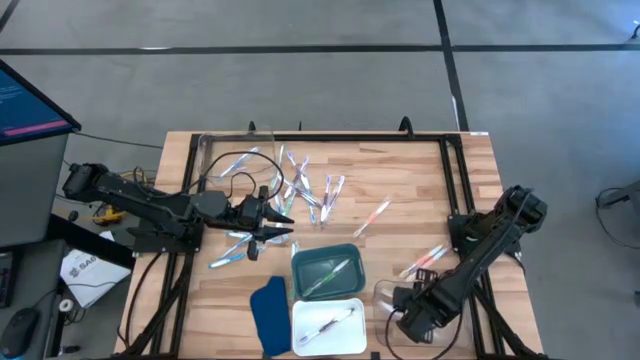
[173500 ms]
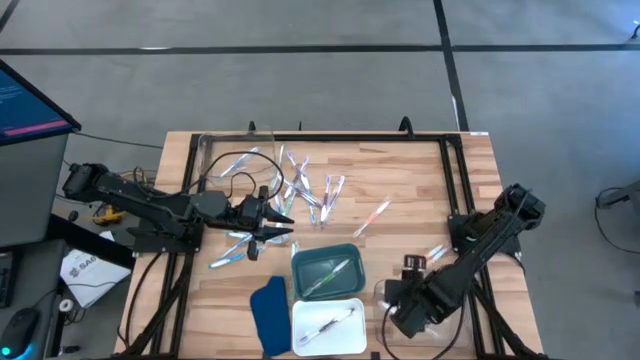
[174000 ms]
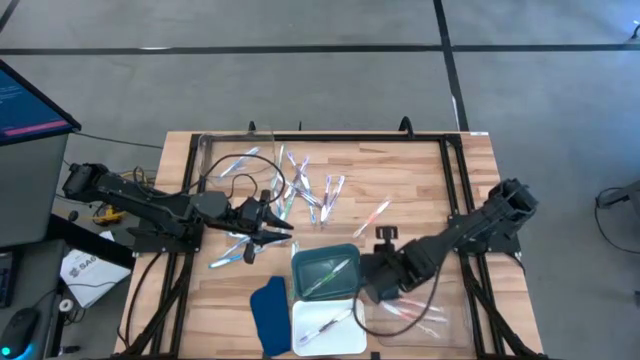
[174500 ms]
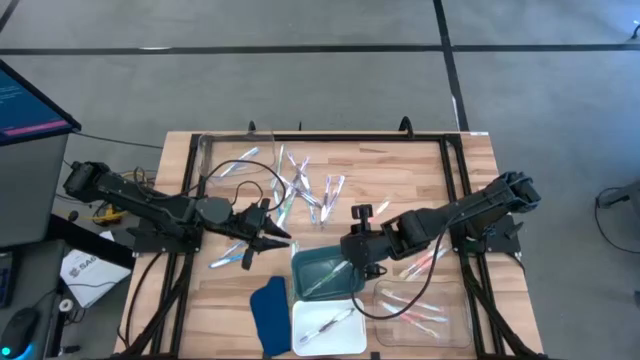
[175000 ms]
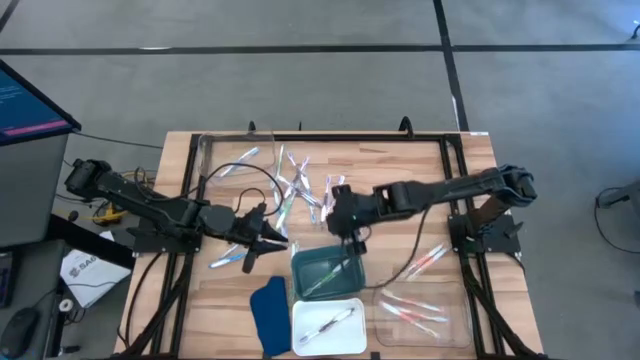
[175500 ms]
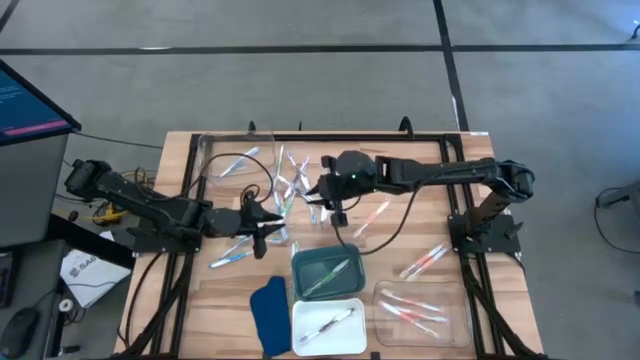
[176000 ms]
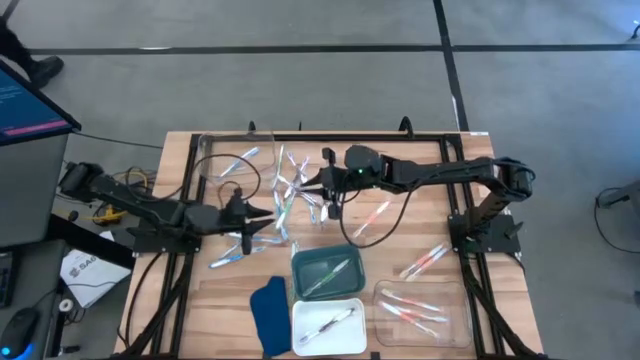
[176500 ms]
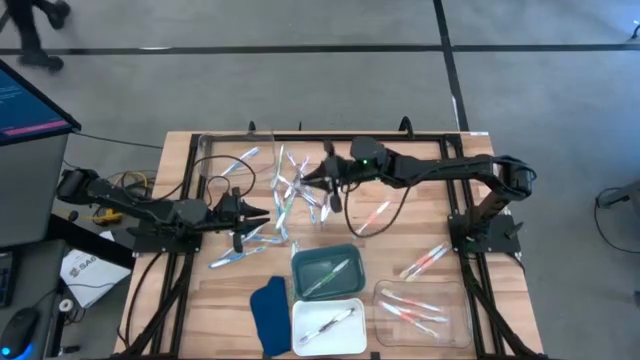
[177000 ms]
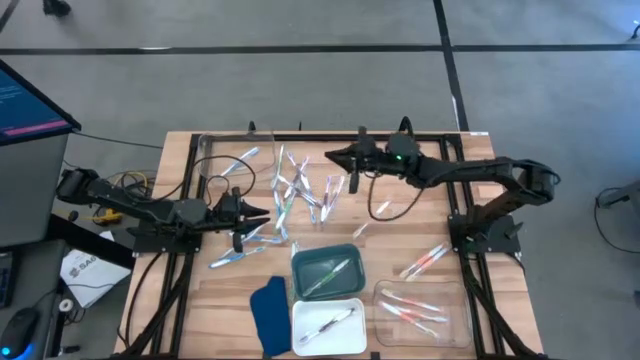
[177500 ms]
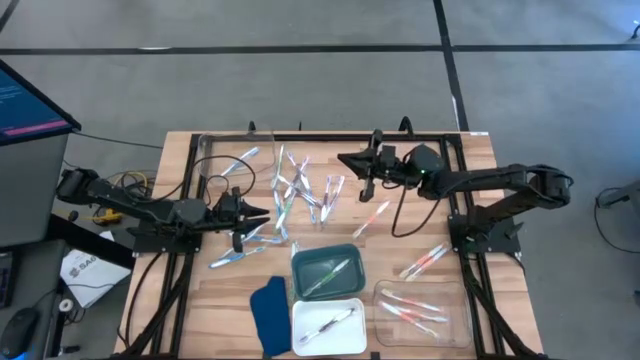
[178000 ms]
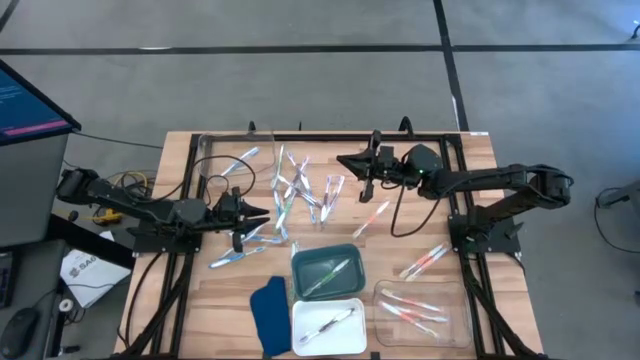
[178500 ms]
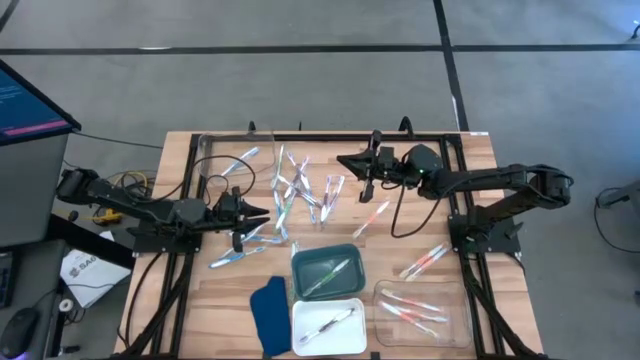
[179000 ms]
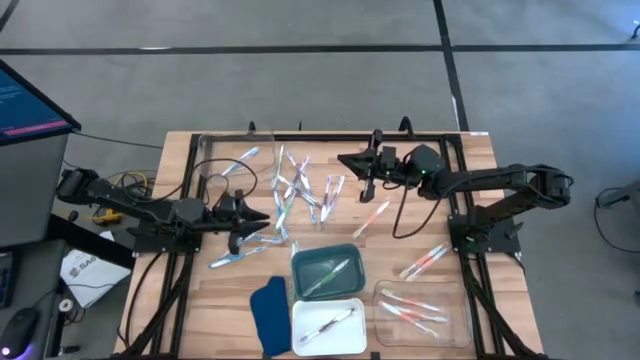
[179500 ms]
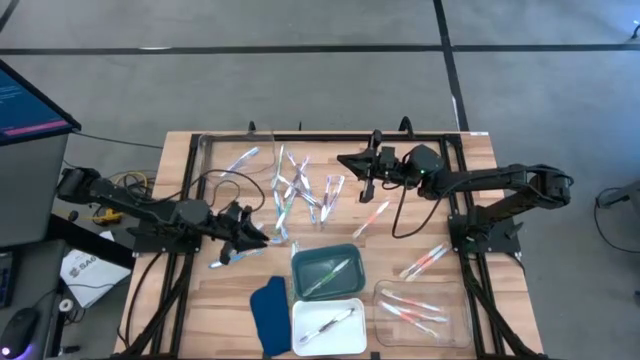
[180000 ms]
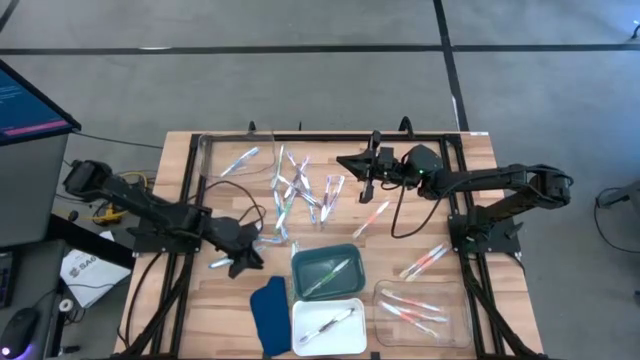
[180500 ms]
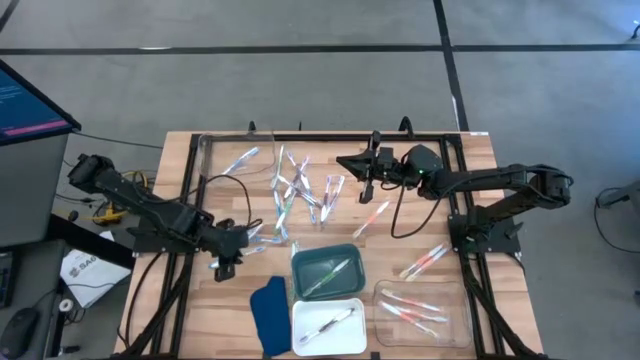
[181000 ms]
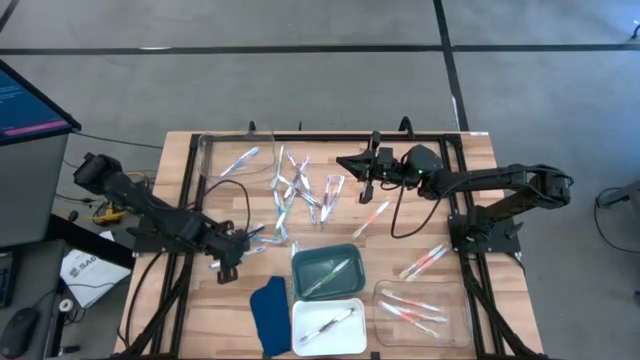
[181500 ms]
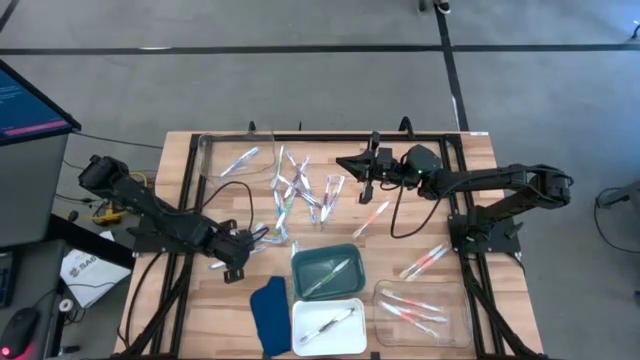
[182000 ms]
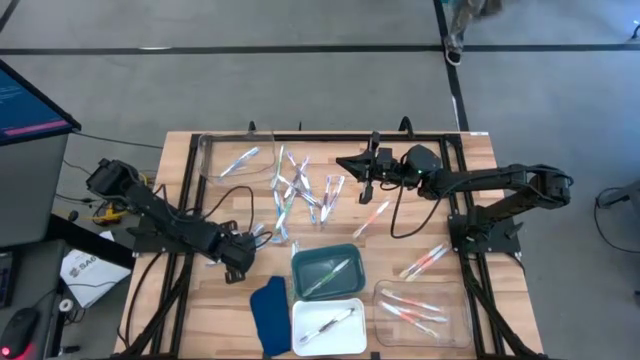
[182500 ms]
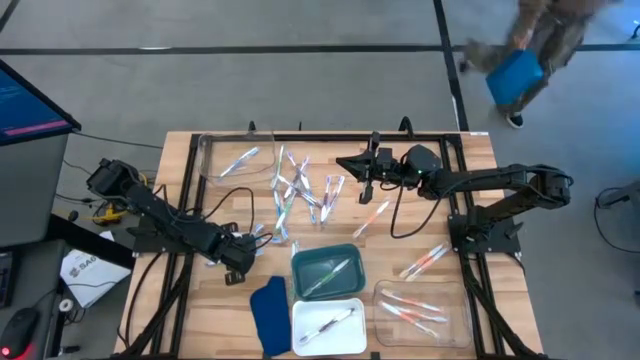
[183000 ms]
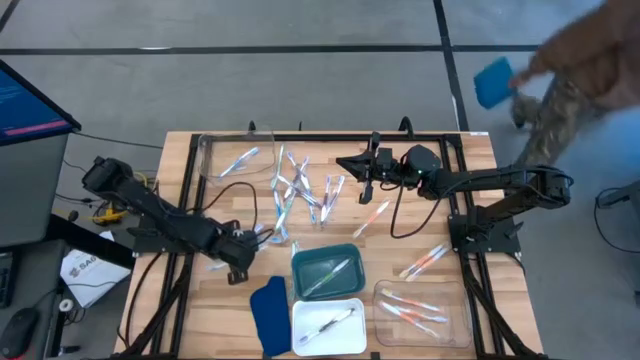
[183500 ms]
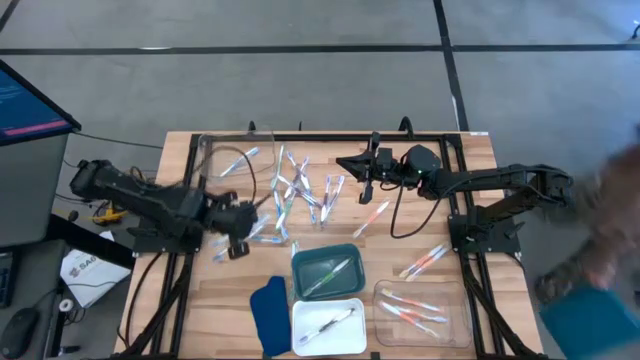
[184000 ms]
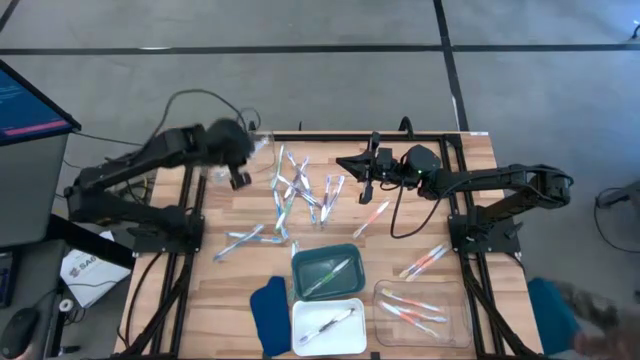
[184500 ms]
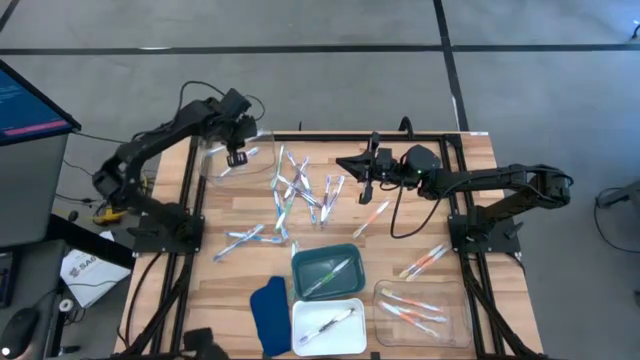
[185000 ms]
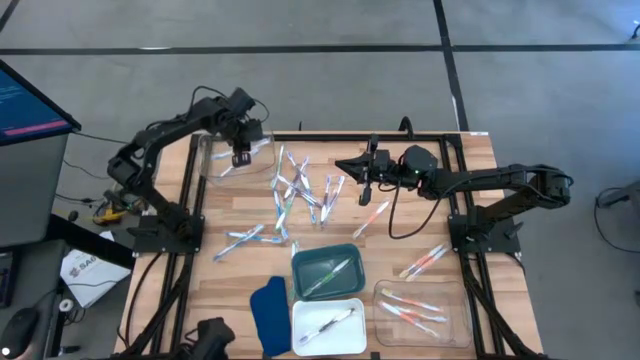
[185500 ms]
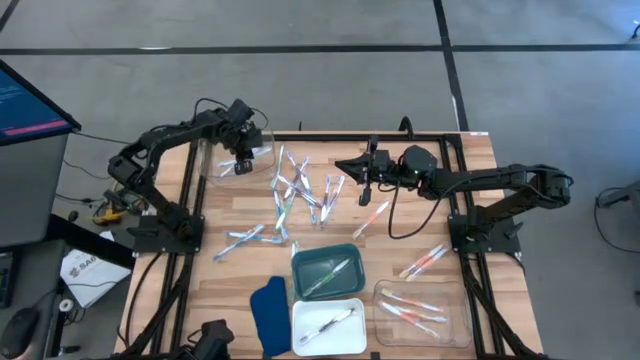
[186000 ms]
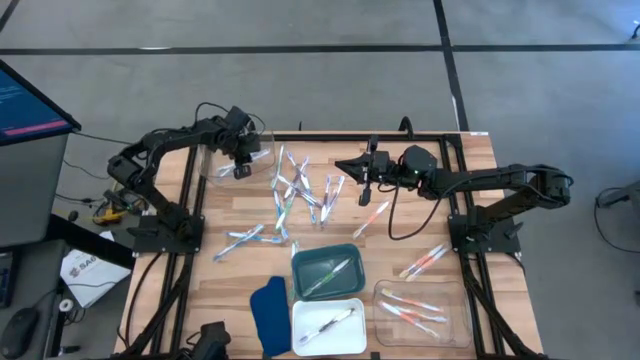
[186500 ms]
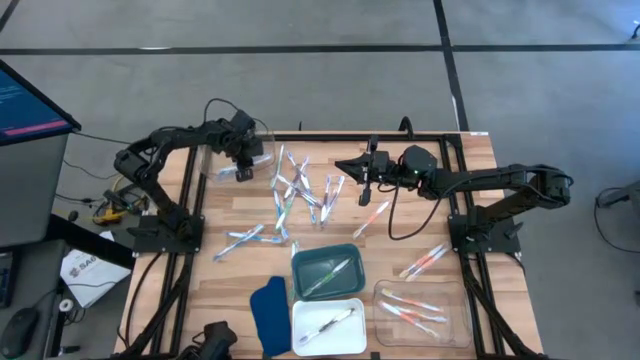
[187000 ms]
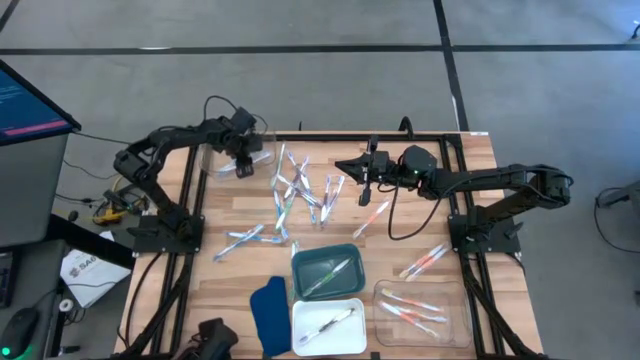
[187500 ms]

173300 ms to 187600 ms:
Task: Pick & Place Toothbrushes
Put the blue toothbrush into the top transparent bin

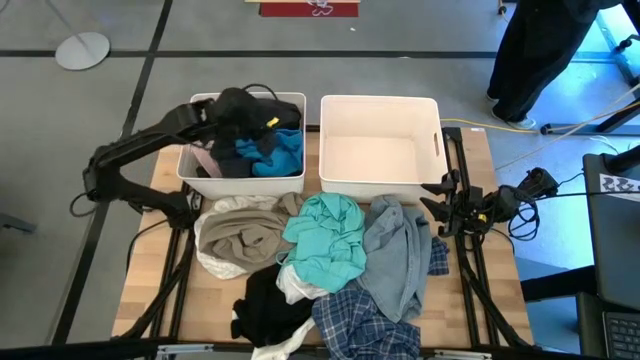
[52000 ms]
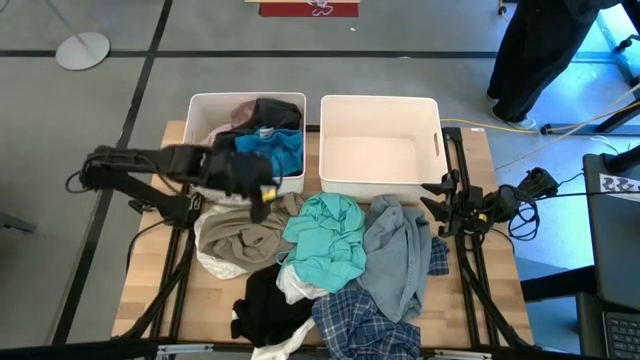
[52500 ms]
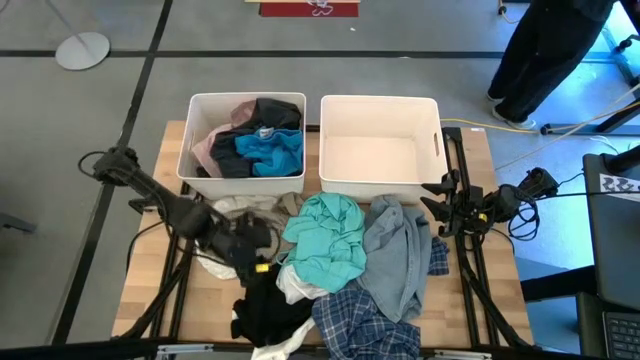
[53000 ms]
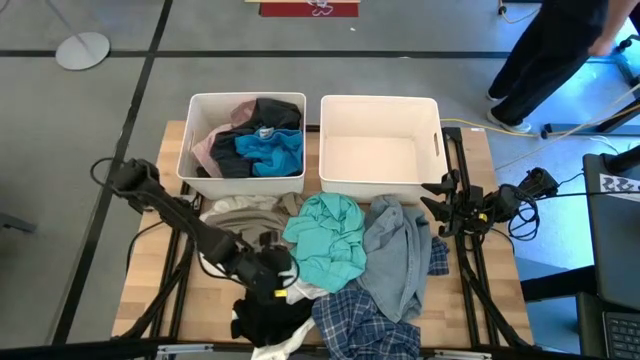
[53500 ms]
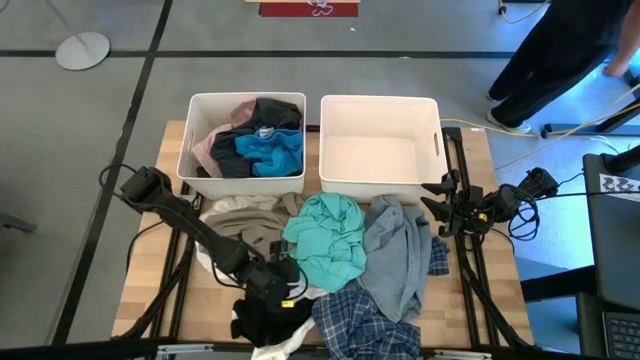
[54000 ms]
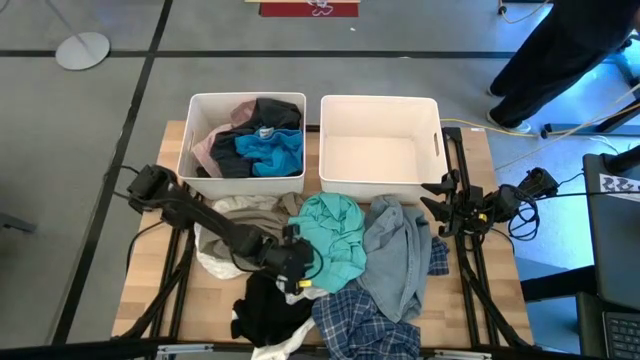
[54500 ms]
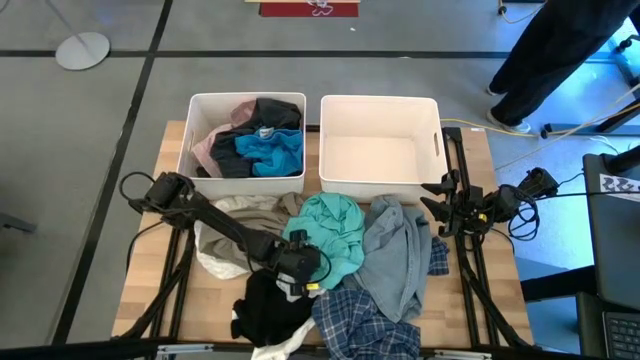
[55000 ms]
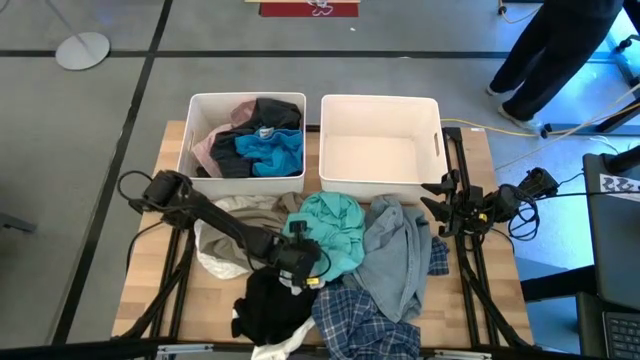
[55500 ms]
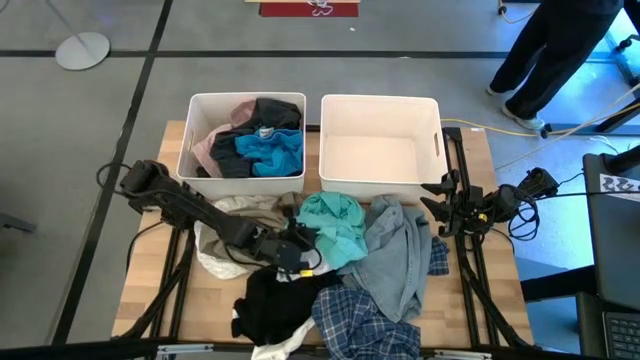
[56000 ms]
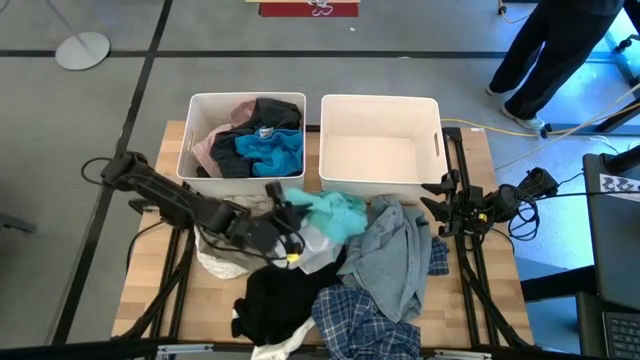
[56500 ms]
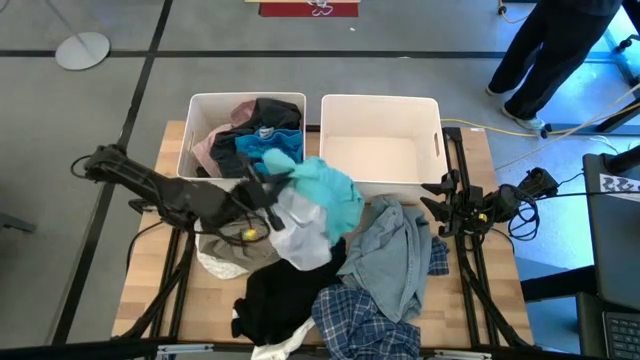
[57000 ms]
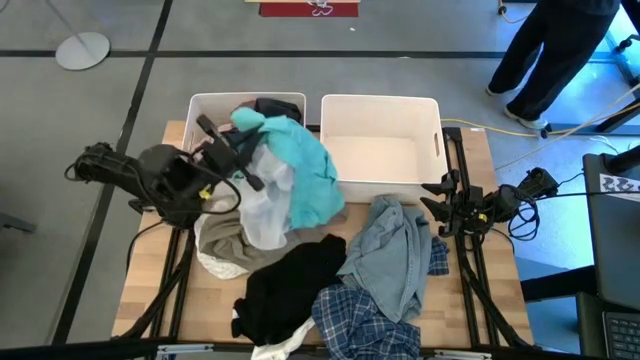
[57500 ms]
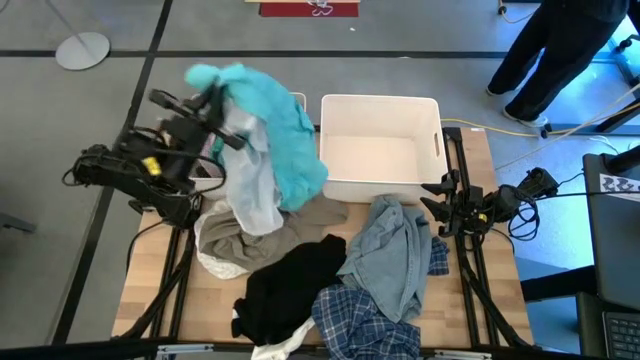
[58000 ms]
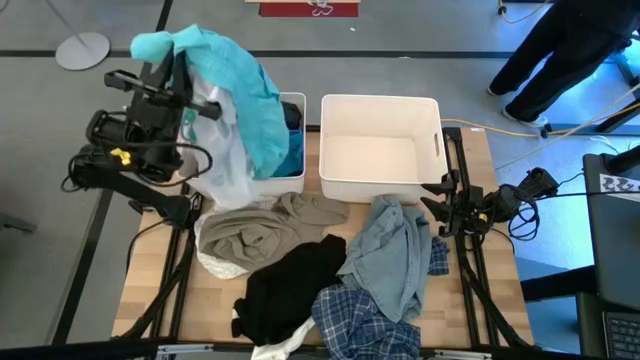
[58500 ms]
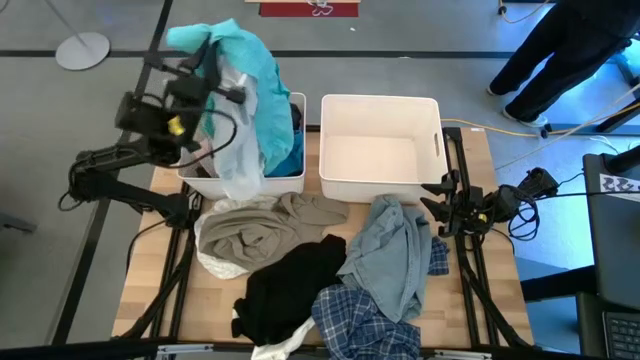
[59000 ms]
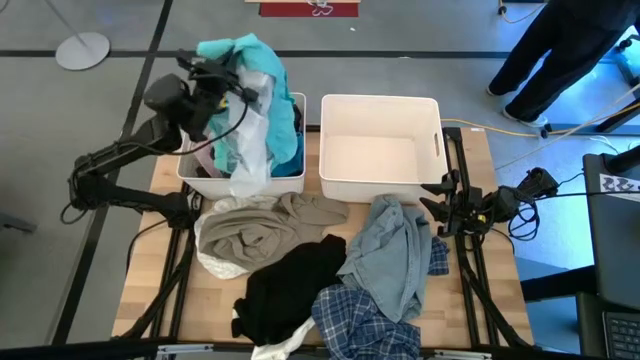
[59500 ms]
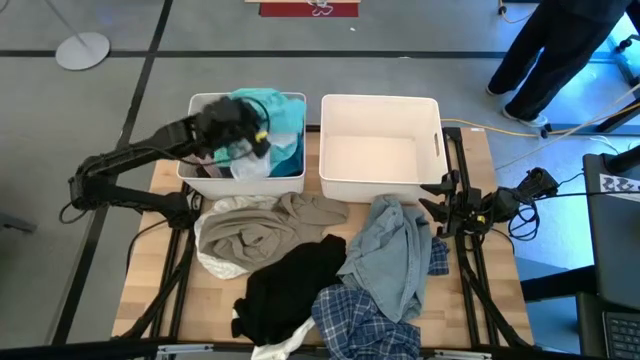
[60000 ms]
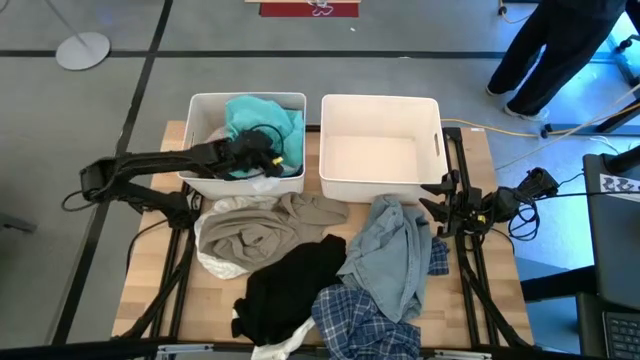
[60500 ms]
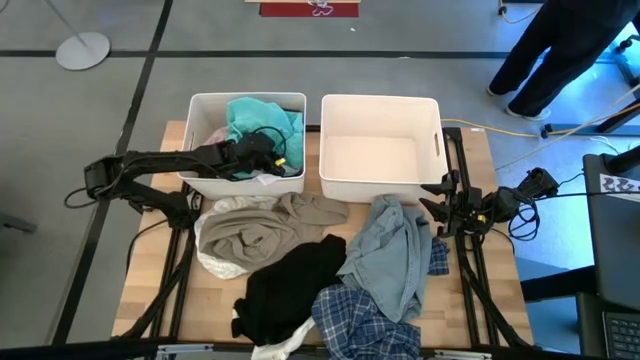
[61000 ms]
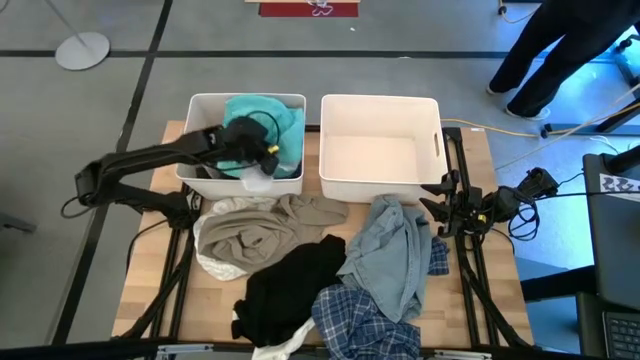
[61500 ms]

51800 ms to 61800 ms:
Task: Sort clothes
Put the light blue shorts into the left white bin
